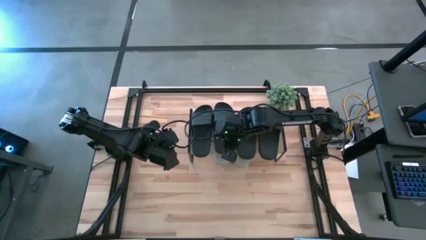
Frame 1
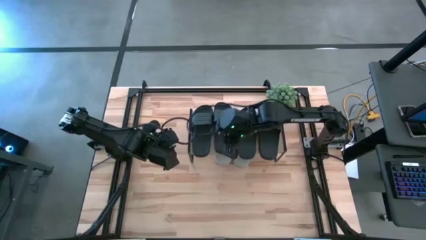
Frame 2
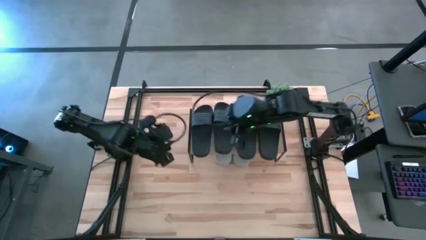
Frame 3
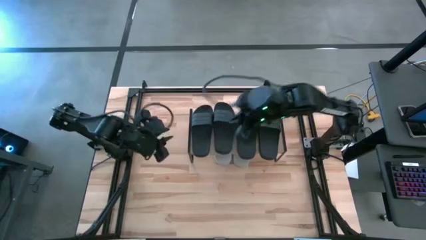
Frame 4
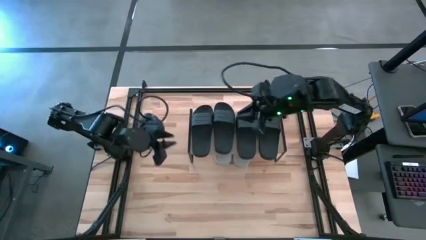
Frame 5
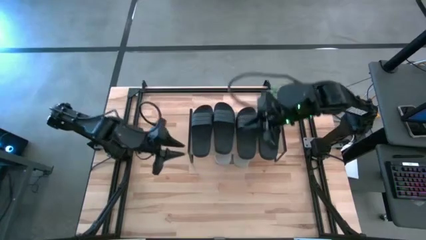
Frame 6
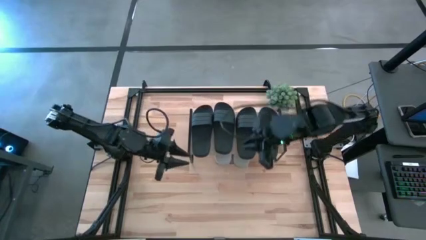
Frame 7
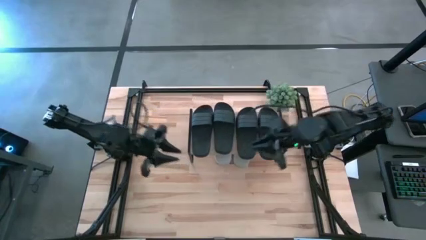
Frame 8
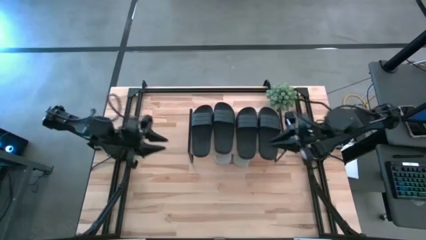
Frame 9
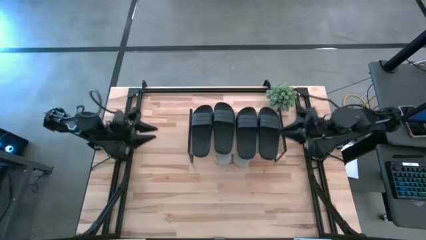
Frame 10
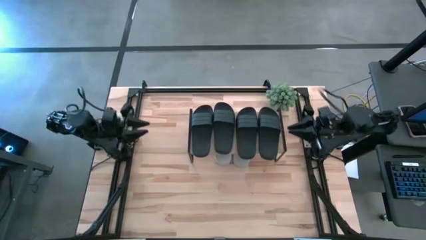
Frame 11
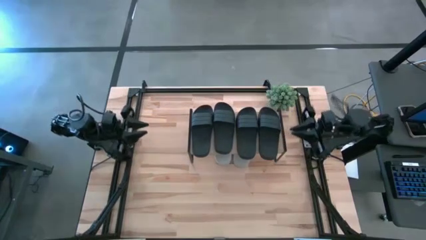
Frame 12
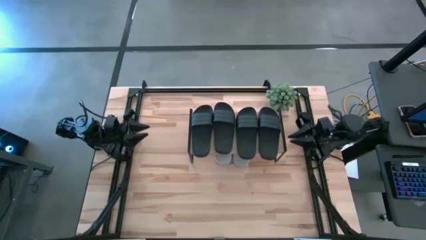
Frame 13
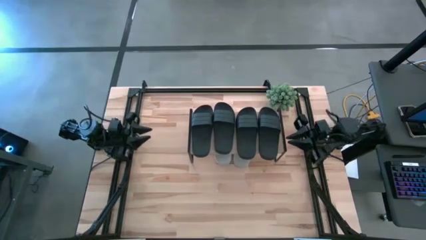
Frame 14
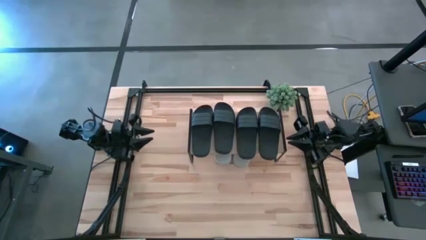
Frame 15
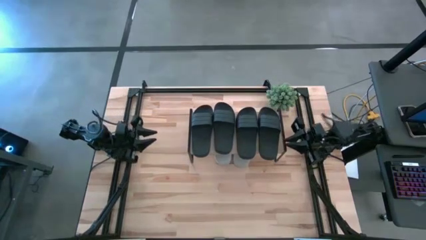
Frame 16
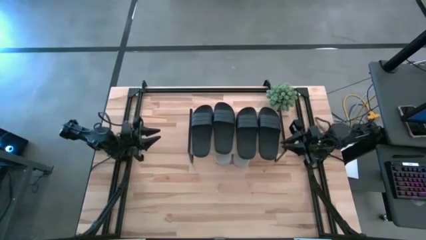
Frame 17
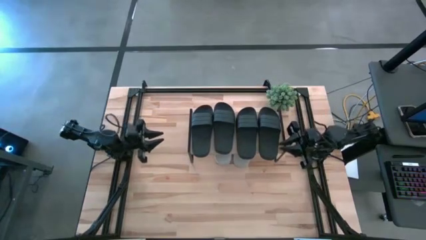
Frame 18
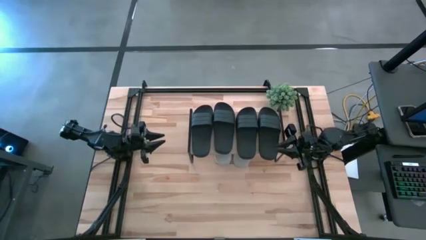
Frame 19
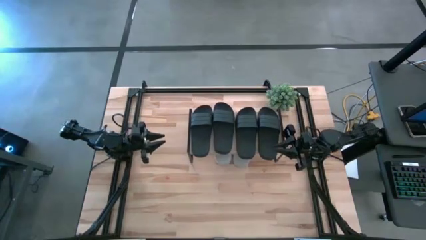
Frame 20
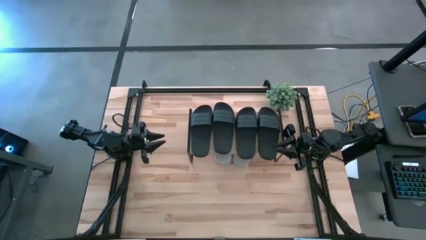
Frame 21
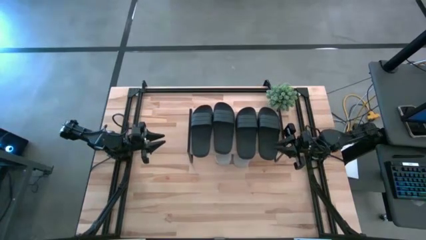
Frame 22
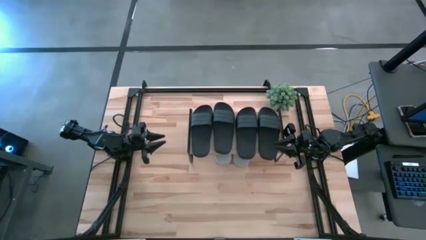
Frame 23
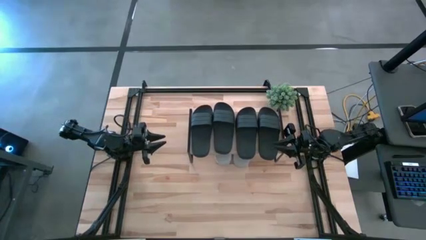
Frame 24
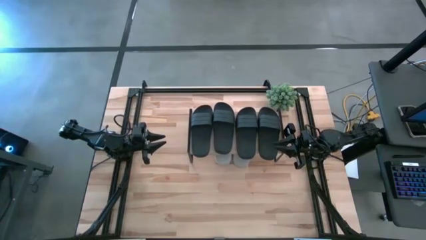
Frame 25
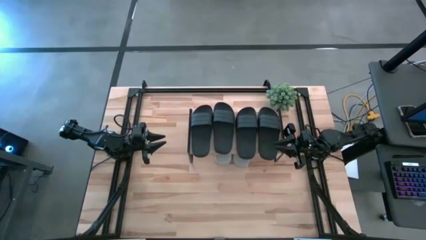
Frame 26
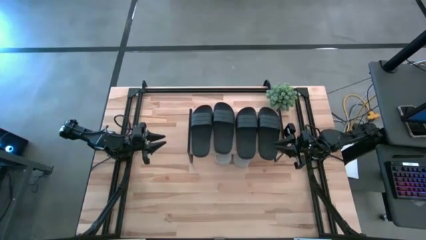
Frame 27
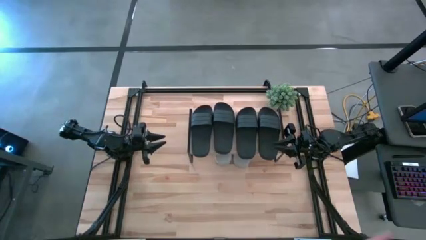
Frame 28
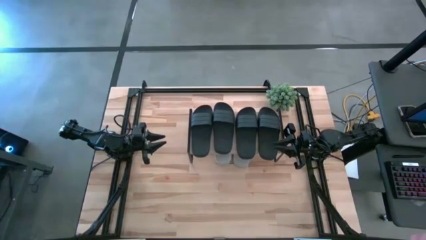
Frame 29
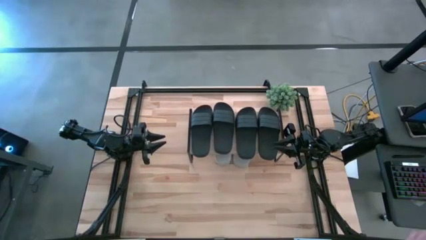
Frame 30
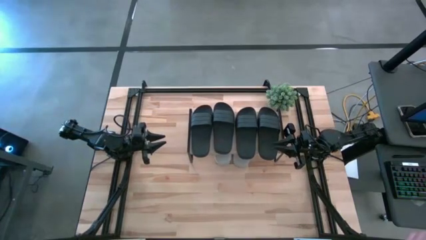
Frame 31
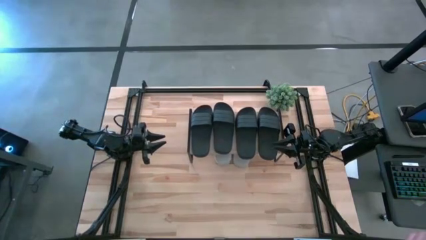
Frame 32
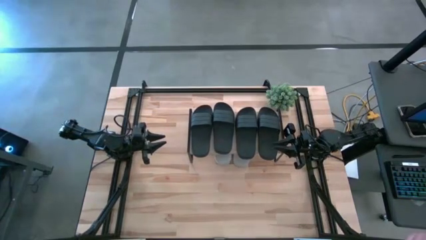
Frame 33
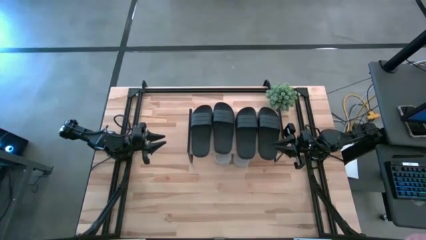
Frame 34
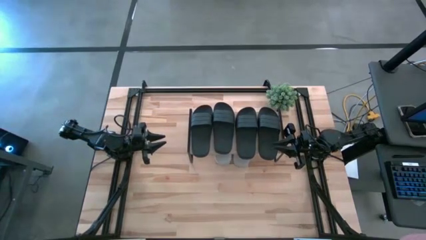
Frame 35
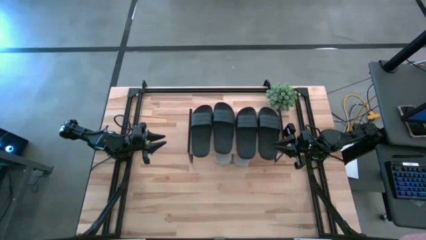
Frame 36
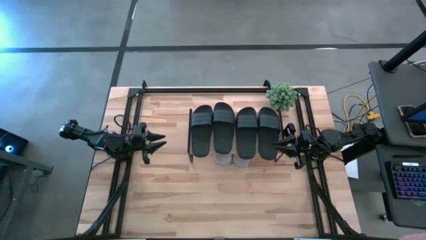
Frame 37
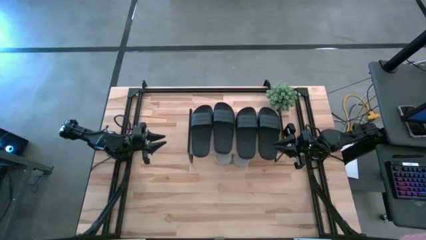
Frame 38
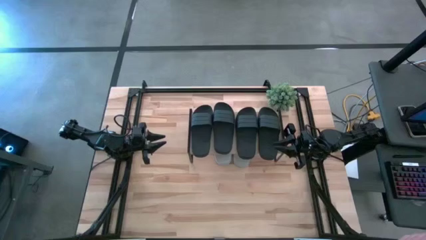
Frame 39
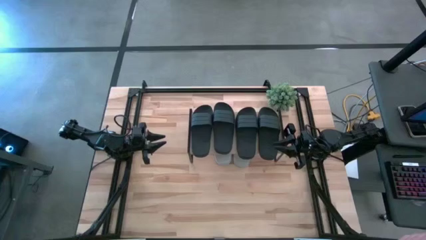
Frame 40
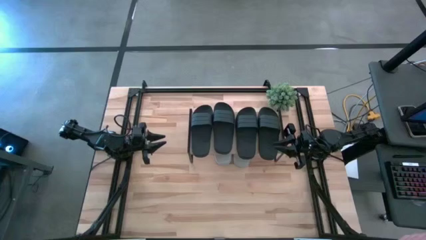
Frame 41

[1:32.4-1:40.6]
Task: Pick and place slides into the shelf
Return to Home Position

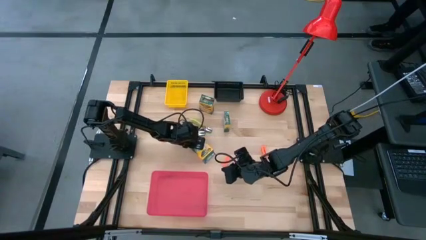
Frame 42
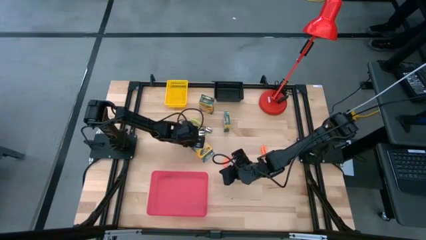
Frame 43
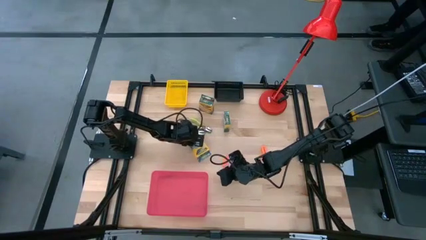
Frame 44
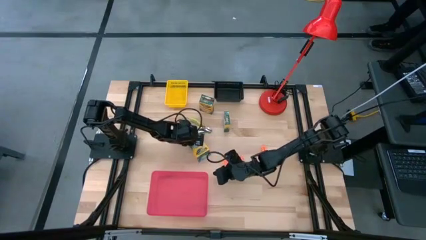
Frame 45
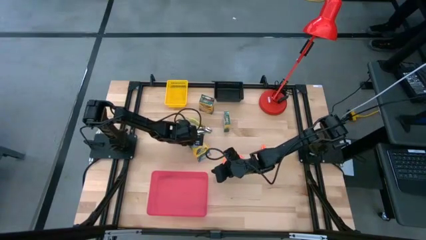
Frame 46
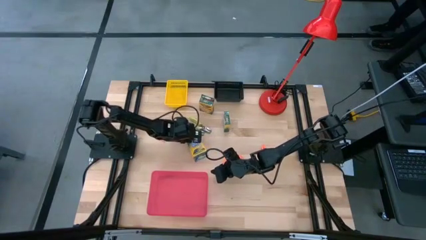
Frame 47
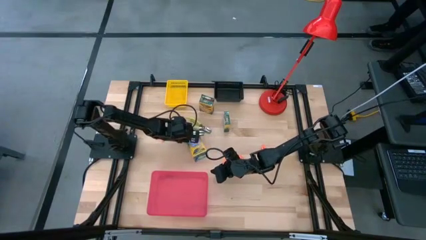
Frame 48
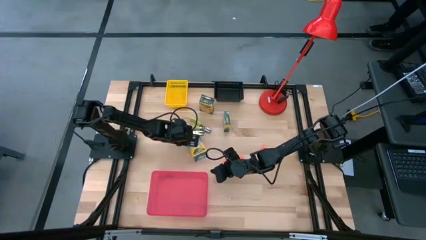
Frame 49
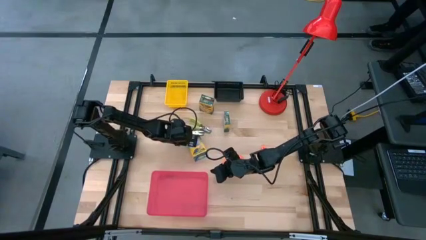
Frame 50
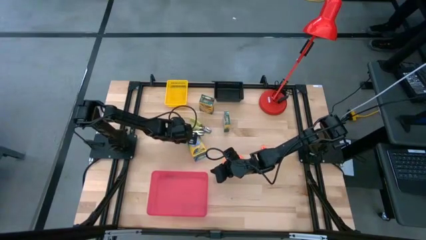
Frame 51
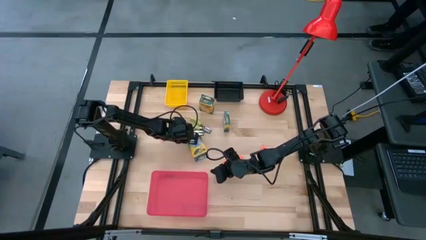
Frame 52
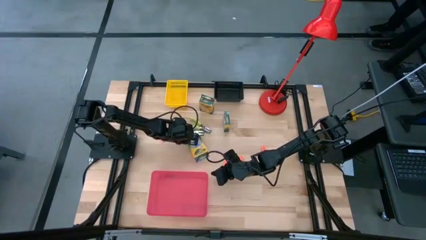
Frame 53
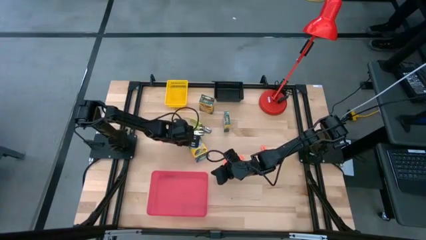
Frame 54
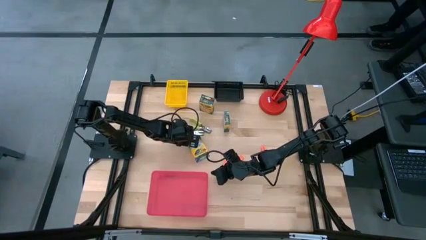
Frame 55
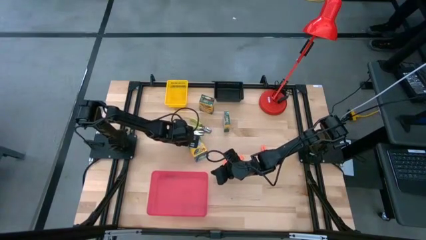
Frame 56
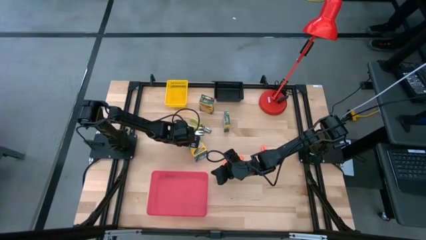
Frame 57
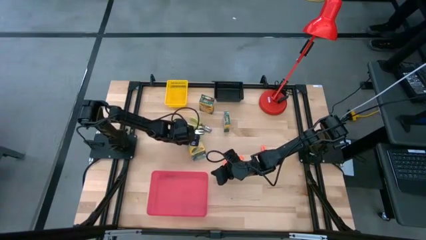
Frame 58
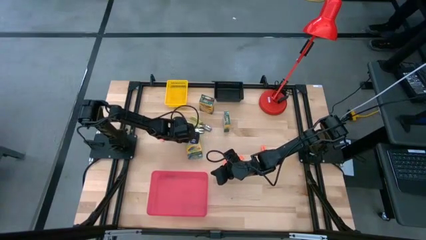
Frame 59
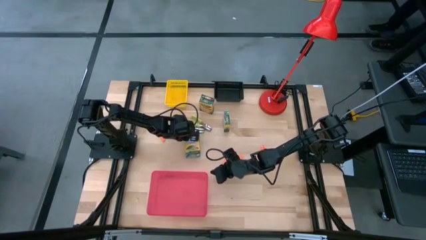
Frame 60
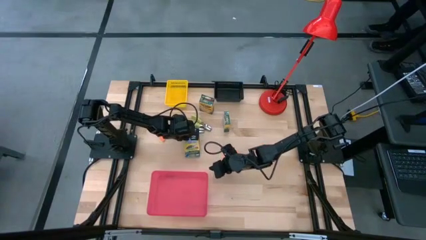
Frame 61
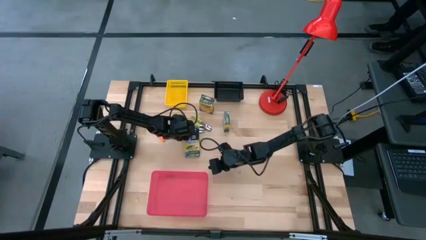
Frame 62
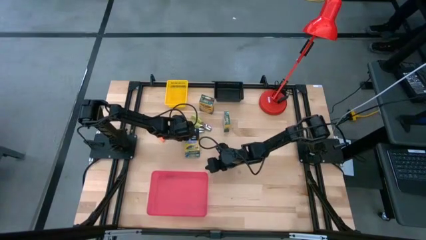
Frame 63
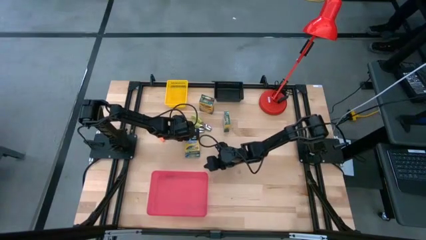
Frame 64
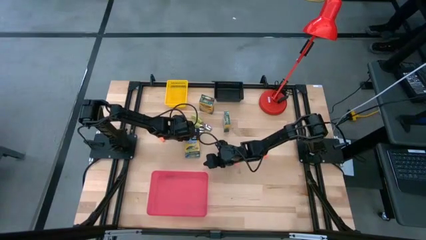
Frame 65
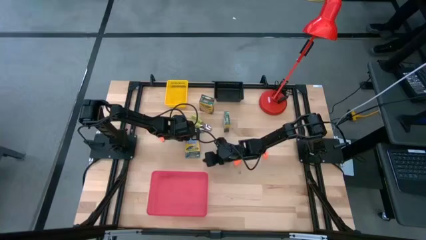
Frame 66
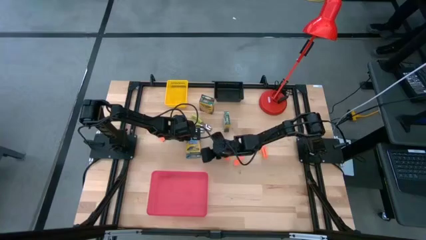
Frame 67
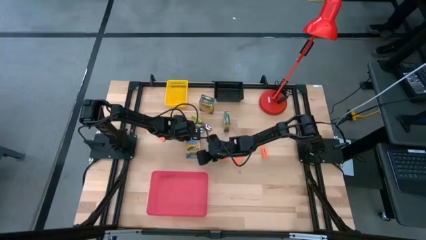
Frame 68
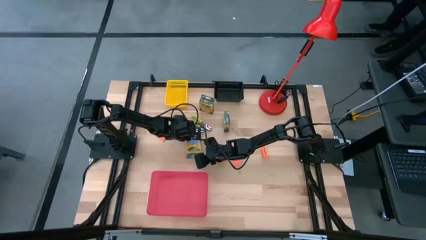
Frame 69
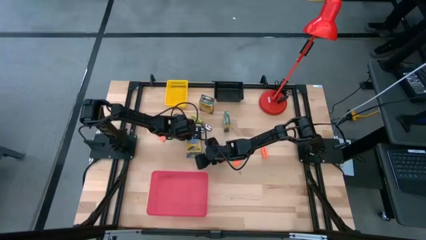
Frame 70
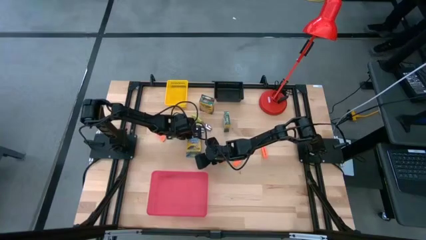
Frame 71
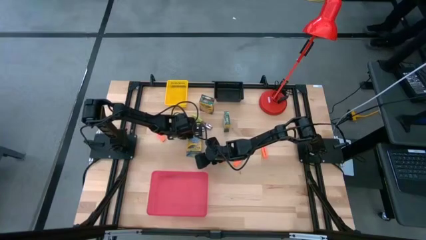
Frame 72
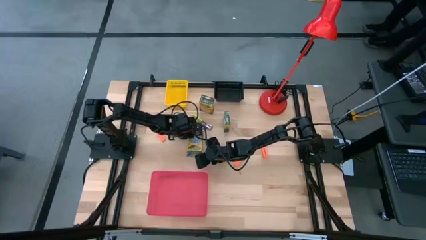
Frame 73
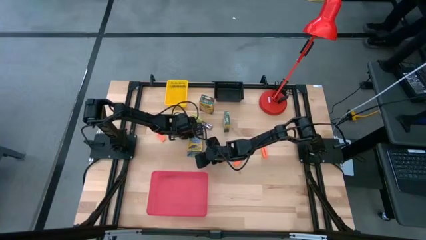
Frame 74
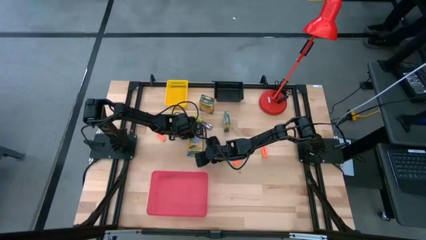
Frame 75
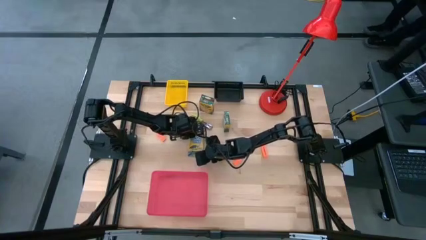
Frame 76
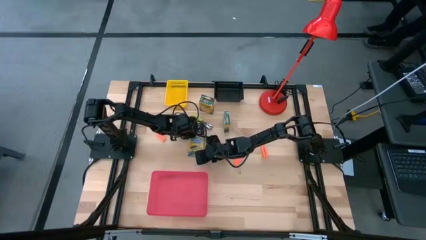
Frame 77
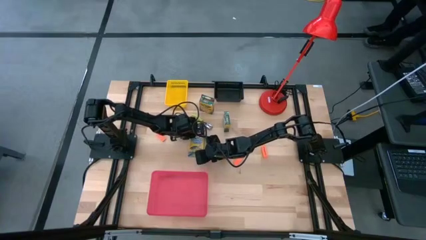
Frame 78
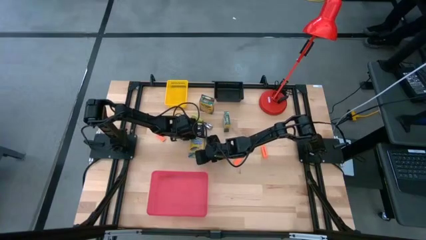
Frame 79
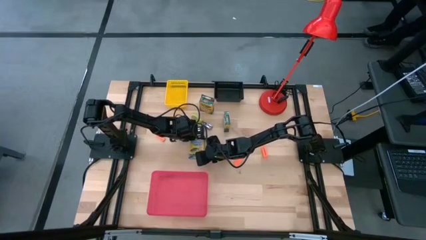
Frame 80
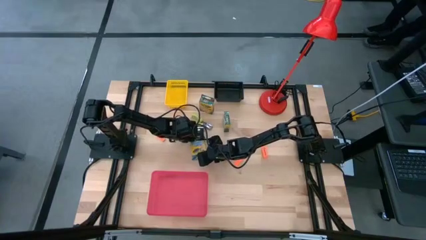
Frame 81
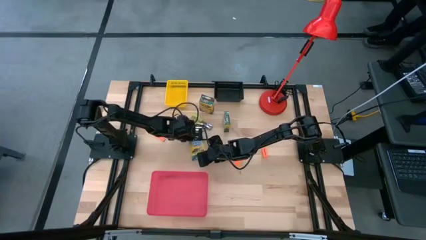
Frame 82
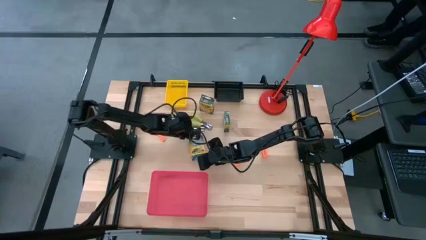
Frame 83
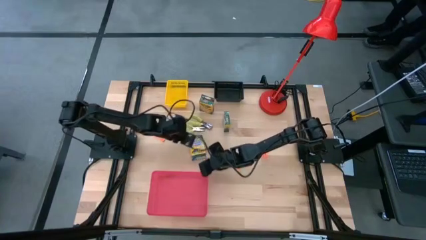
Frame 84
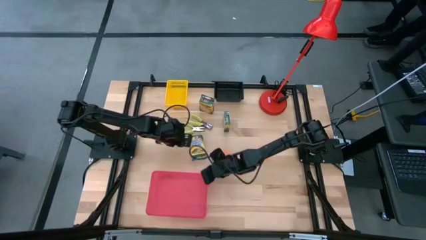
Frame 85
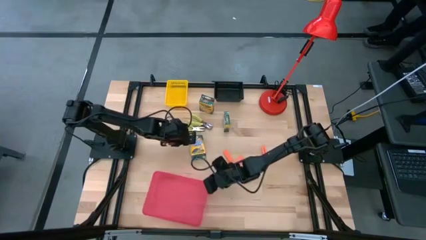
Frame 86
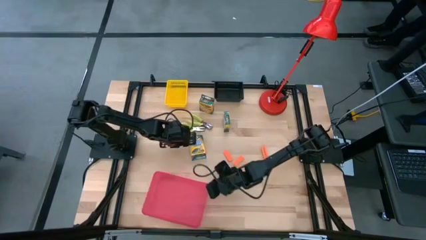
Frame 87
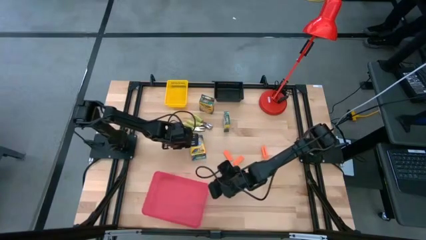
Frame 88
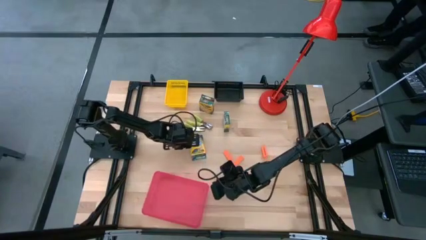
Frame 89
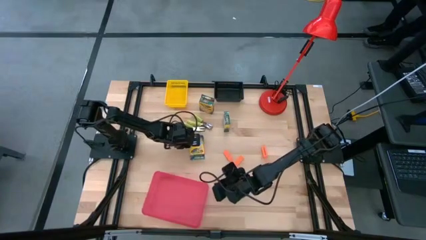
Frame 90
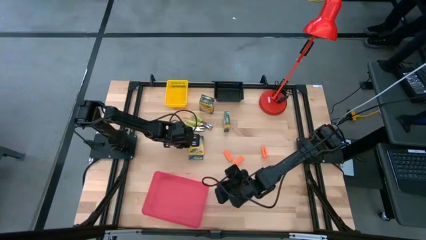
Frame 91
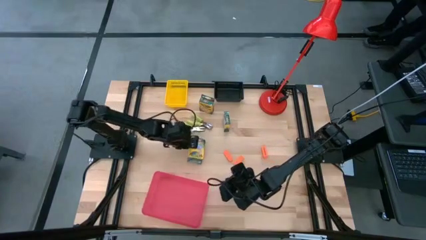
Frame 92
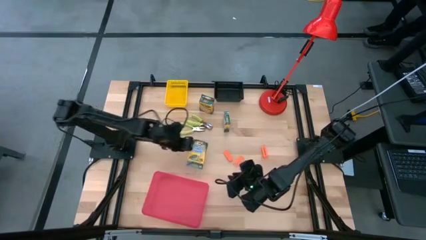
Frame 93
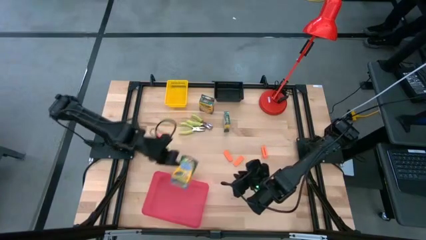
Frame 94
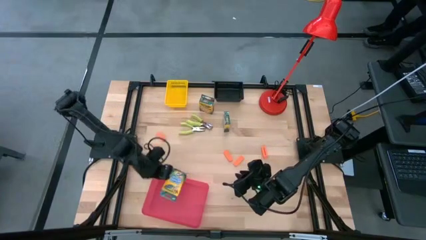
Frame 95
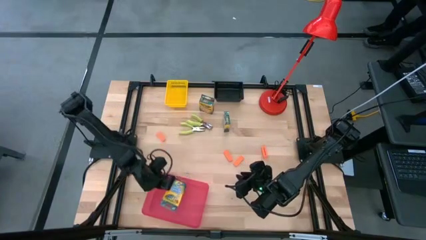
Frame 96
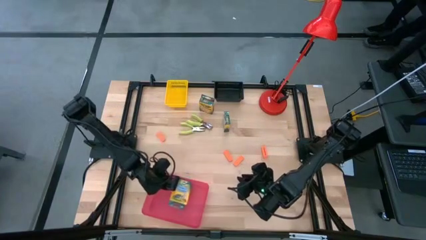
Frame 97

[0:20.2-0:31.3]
Task: Pick & Place School Supplies
Put the yellow crayon box into the red bin
